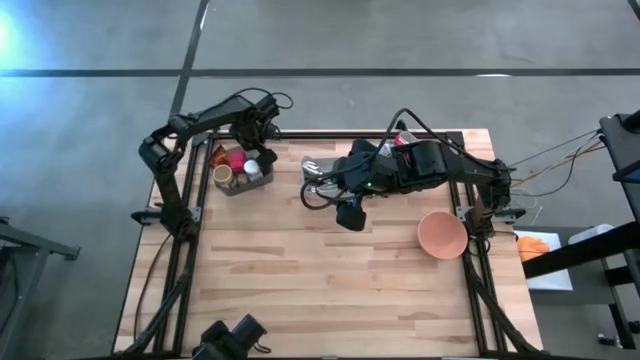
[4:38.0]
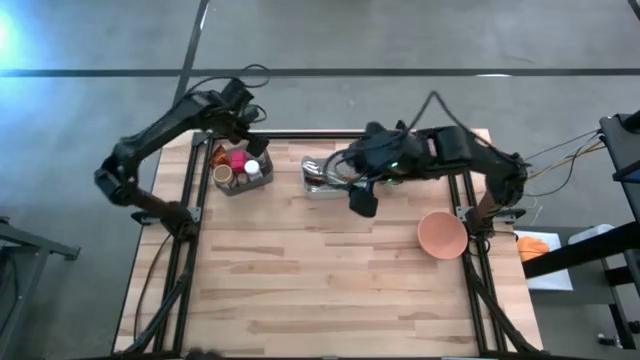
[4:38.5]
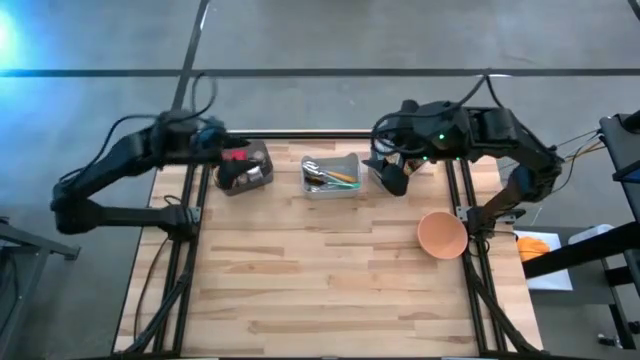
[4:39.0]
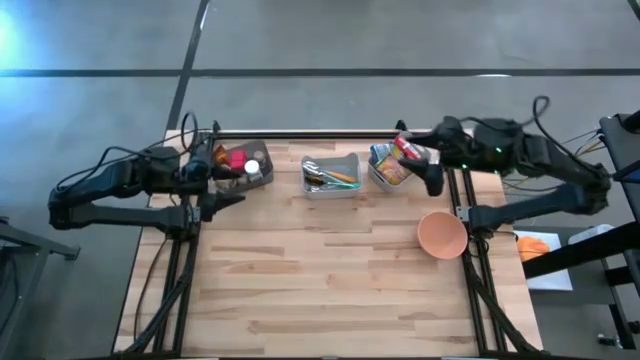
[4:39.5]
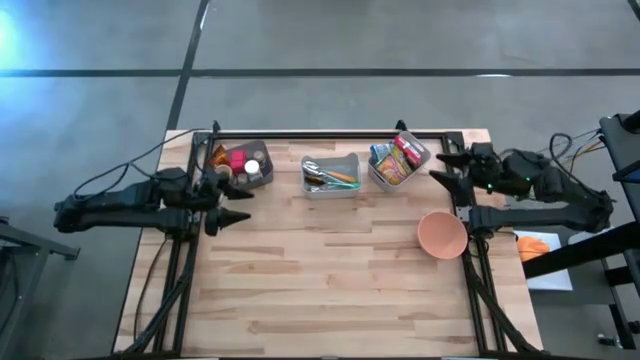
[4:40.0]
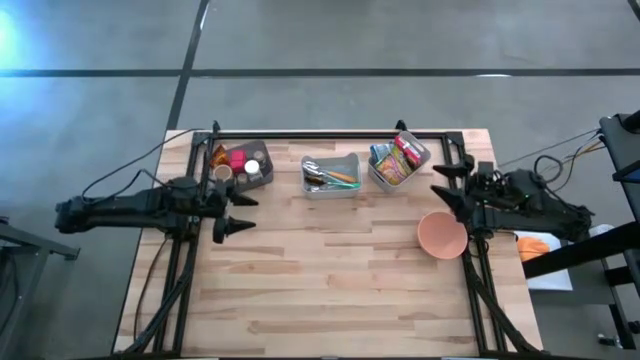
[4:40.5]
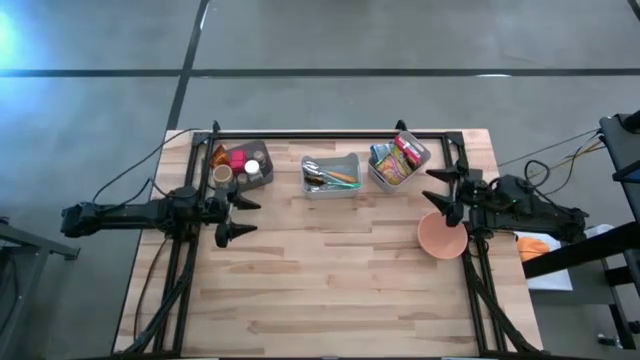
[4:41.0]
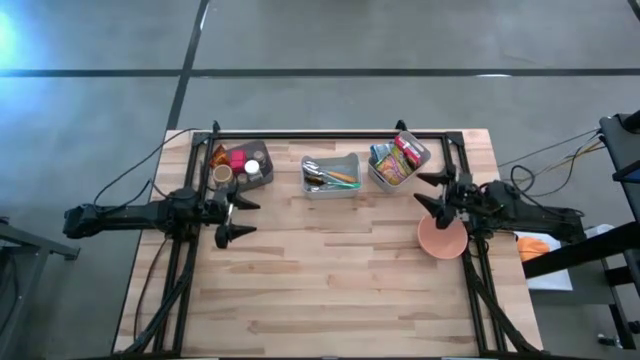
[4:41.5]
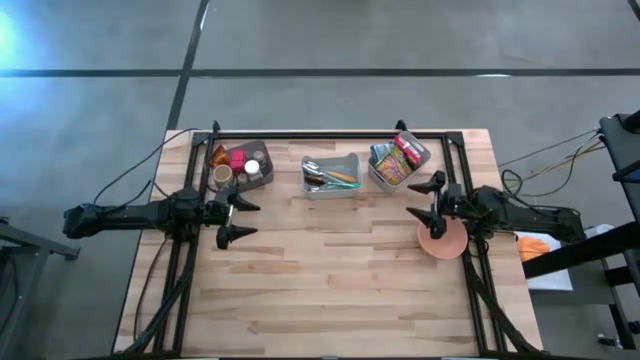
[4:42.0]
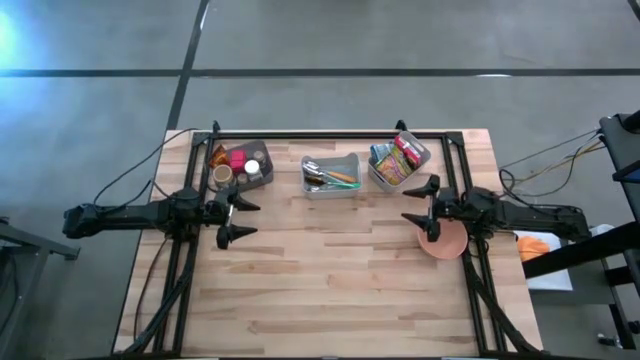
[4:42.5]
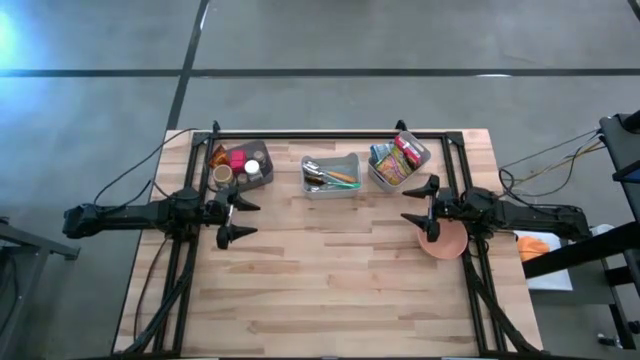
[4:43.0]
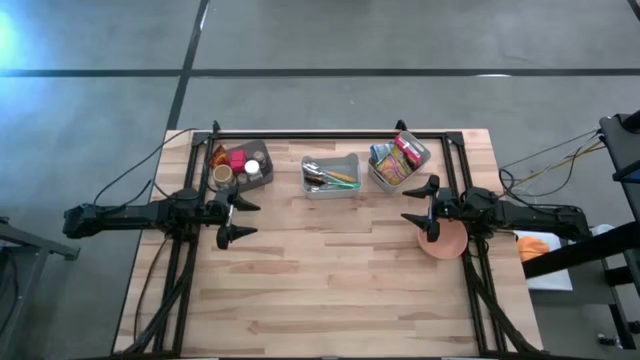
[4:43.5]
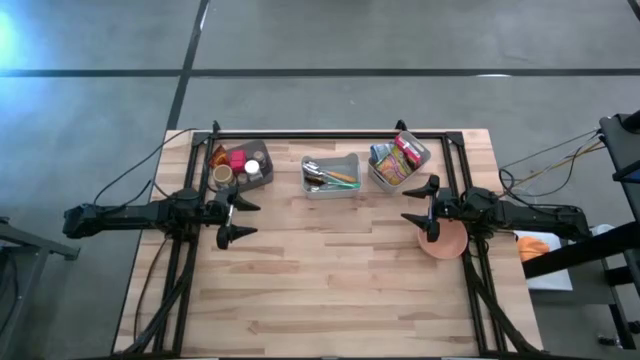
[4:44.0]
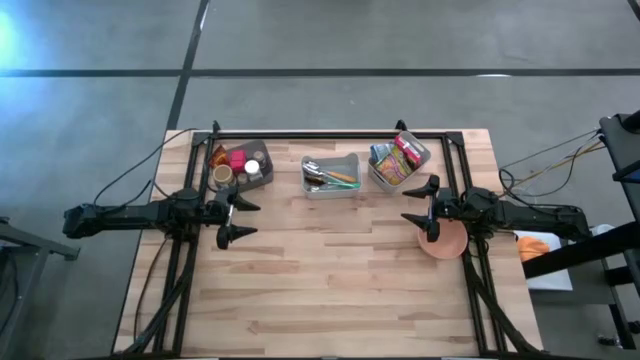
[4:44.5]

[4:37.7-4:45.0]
Return to Home Position
